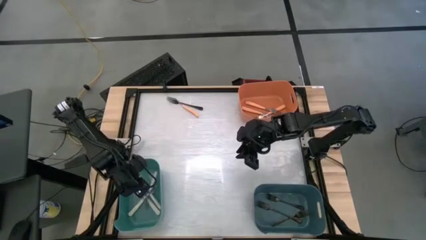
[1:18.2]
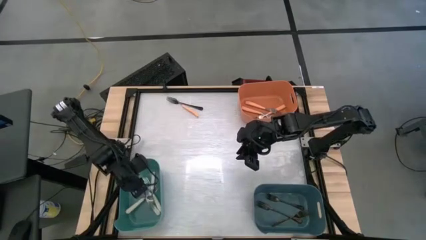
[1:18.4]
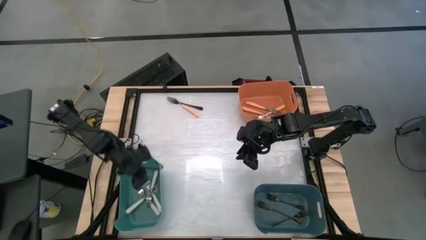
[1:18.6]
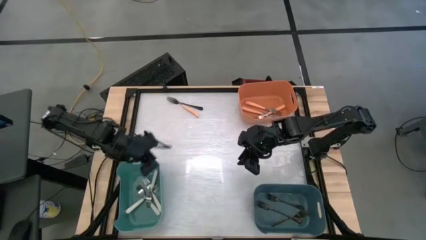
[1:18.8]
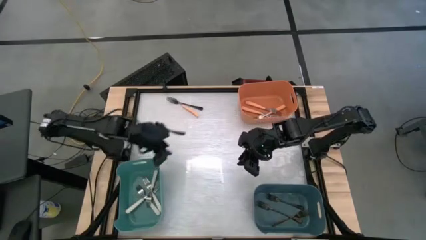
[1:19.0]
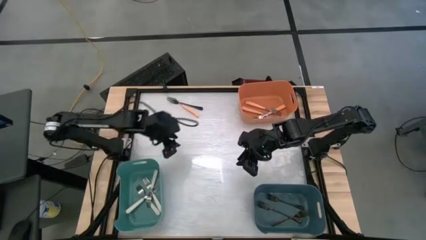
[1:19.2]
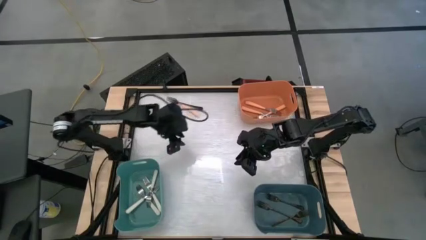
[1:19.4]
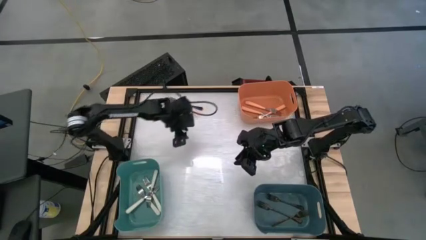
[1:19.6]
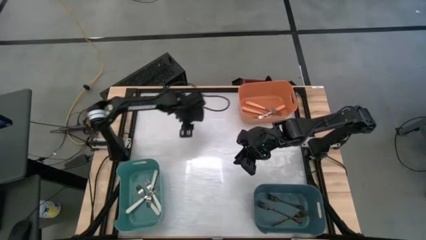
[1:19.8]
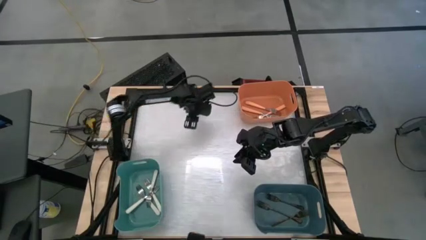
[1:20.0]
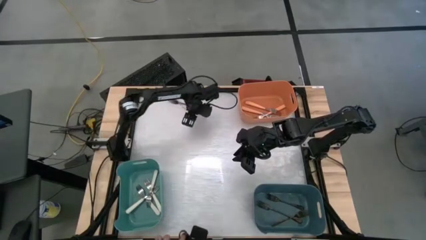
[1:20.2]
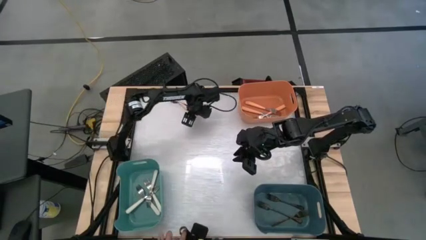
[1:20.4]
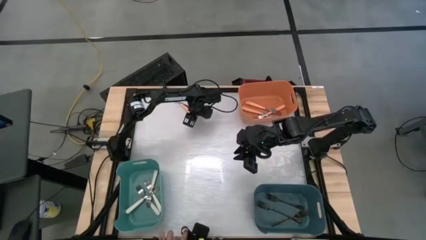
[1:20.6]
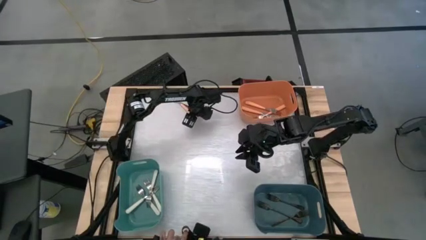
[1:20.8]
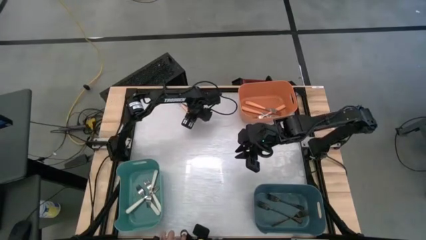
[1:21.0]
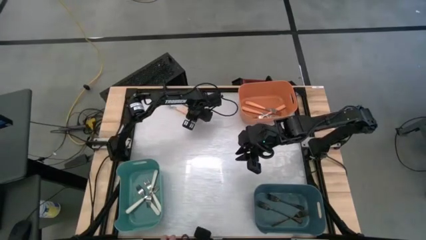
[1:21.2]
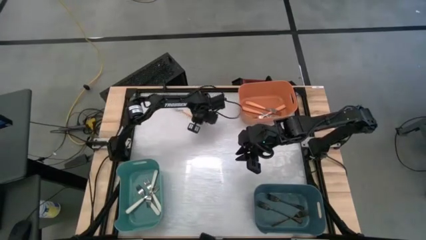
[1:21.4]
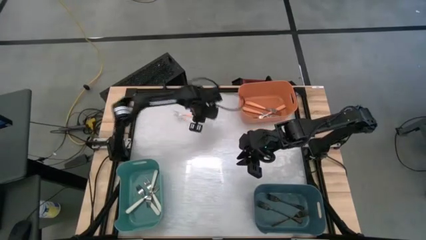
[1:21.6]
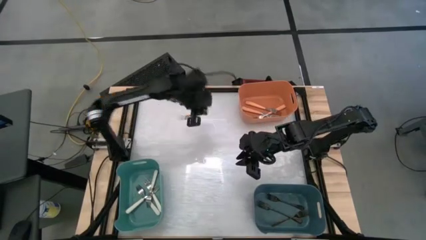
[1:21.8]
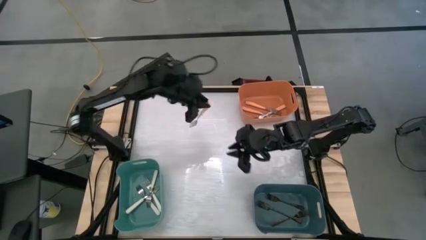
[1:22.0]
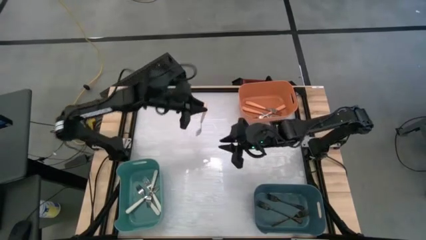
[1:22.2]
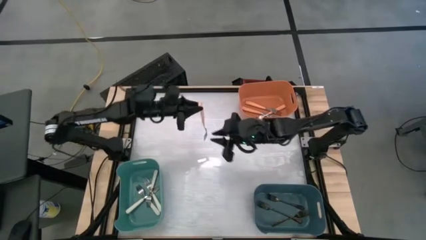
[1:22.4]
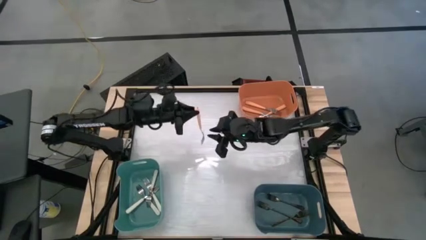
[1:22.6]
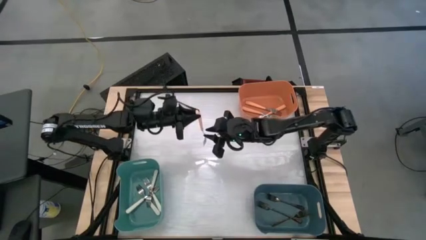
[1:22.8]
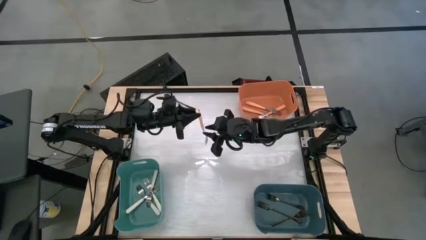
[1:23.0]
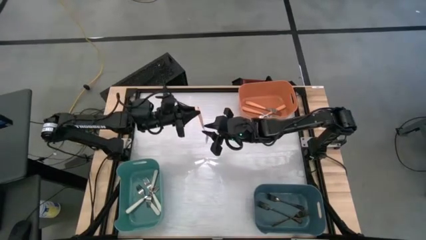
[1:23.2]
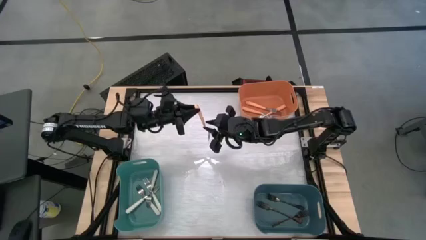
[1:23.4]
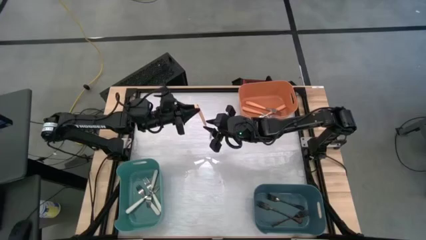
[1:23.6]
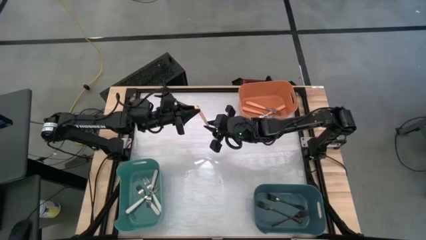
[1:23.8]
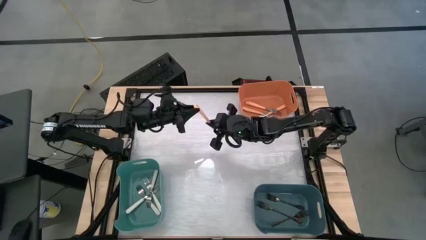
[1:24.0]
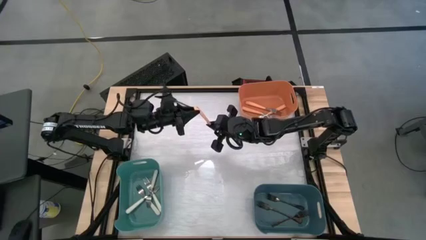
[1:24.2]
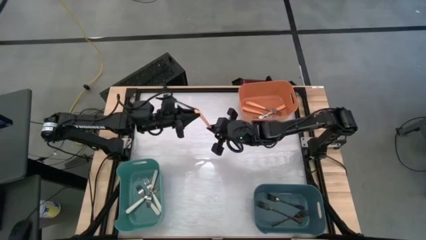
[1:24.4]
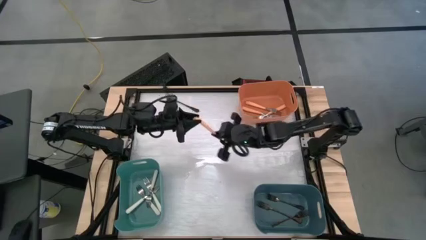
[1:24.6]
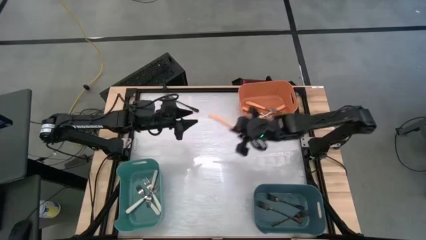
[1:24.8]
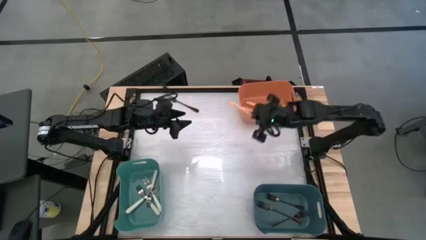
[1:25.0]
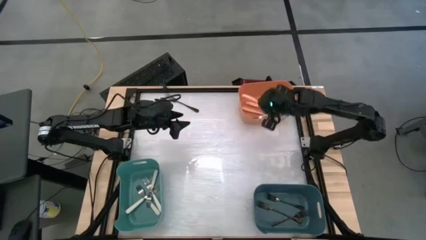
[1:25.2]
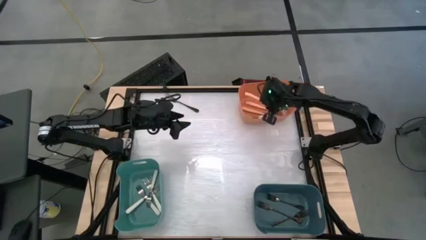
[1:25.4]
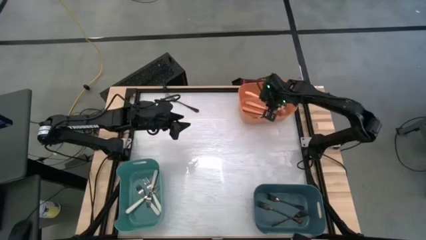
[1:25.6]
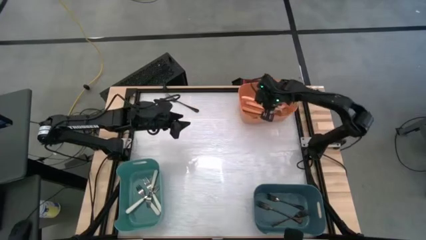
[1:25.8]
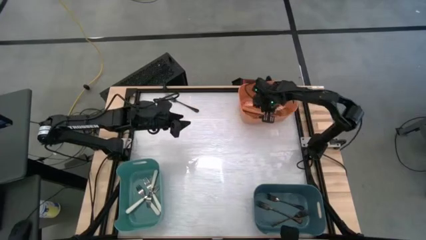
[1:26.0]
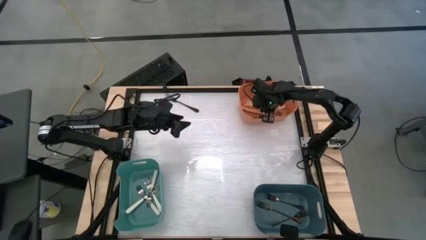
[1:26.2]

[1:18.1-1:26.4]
Task: Sort silverware by color (type)
Put the orange fork into the orange bin

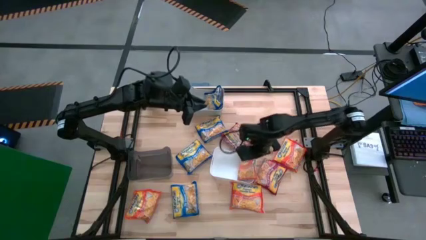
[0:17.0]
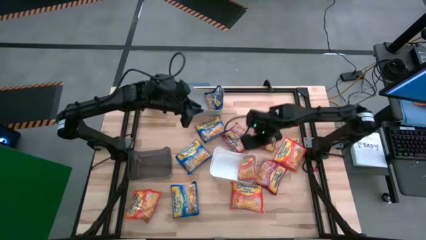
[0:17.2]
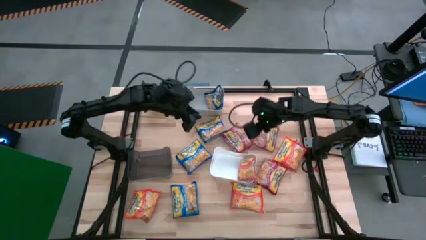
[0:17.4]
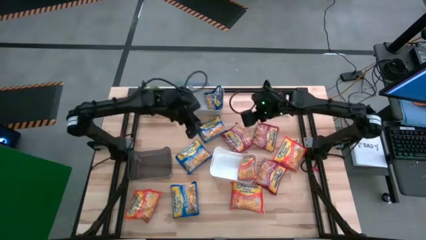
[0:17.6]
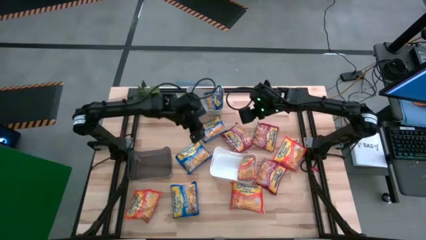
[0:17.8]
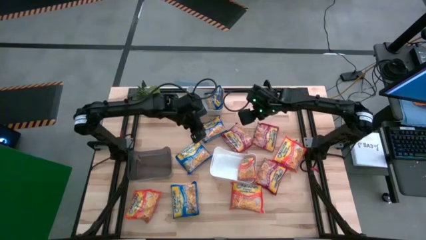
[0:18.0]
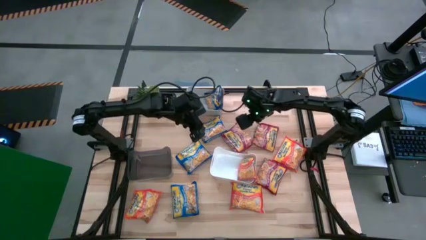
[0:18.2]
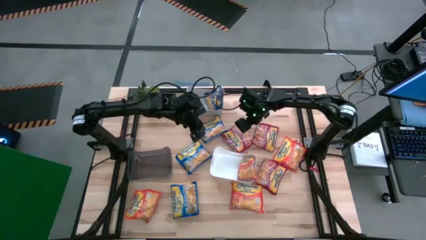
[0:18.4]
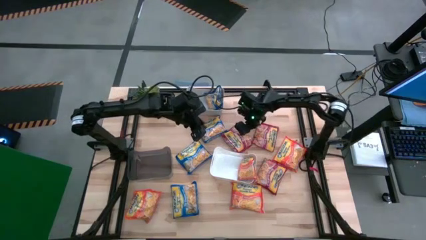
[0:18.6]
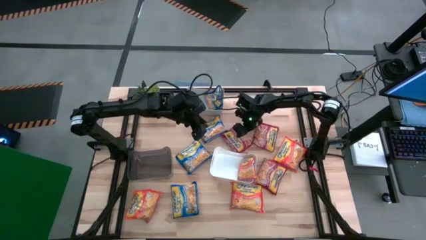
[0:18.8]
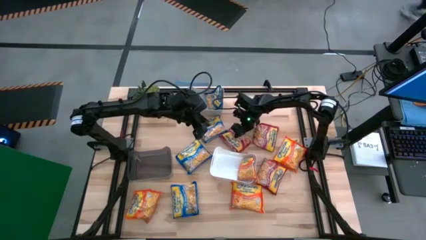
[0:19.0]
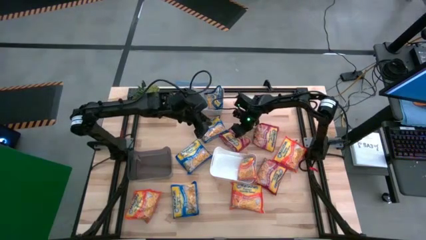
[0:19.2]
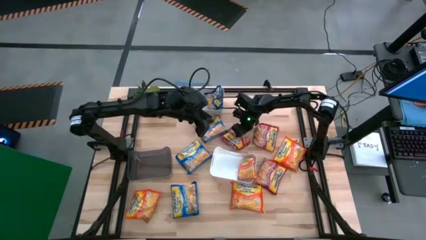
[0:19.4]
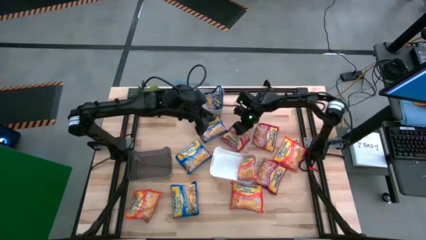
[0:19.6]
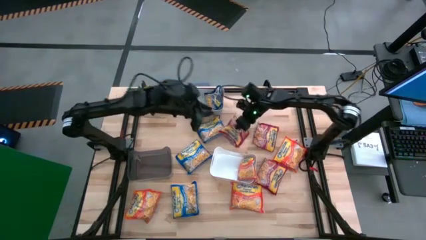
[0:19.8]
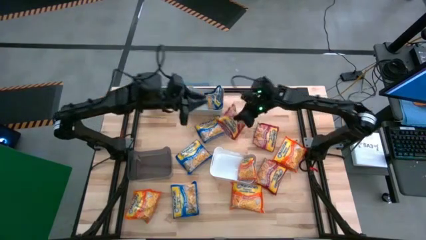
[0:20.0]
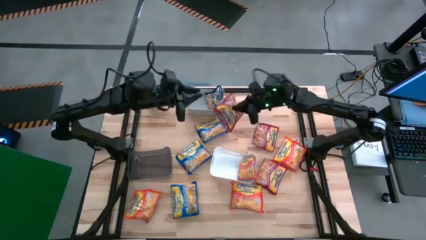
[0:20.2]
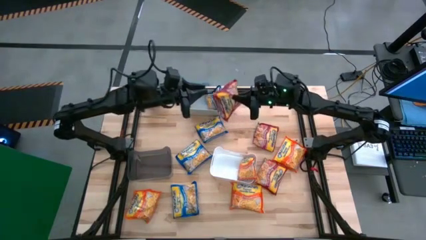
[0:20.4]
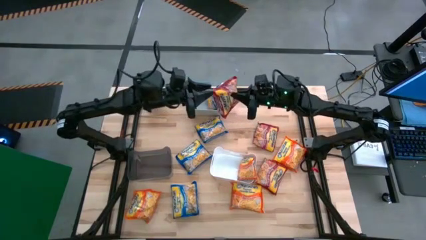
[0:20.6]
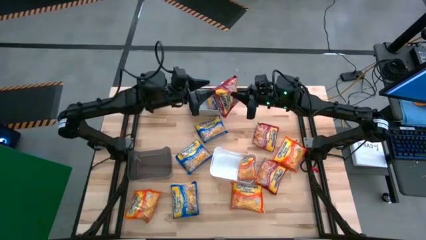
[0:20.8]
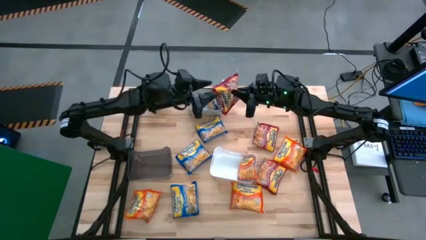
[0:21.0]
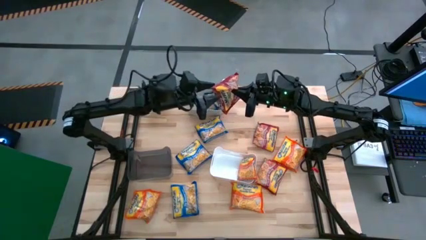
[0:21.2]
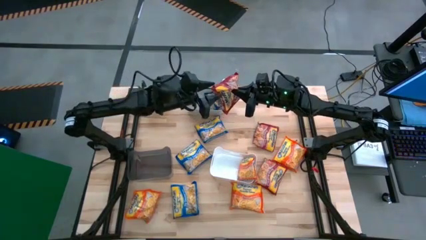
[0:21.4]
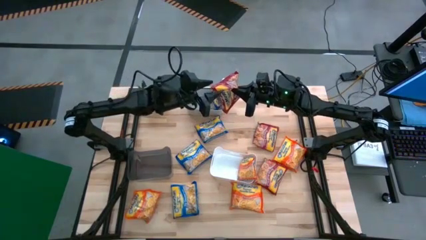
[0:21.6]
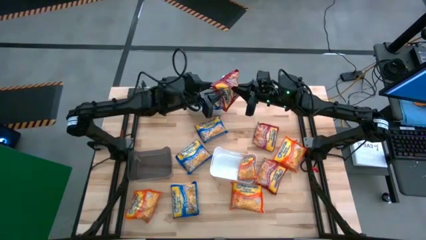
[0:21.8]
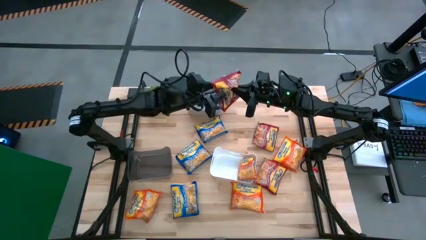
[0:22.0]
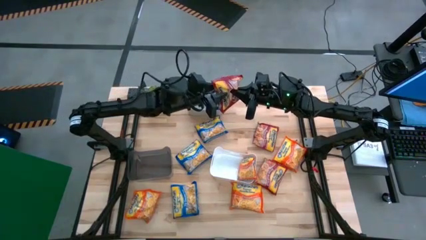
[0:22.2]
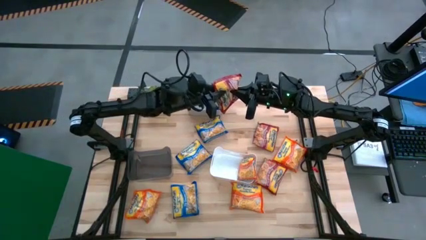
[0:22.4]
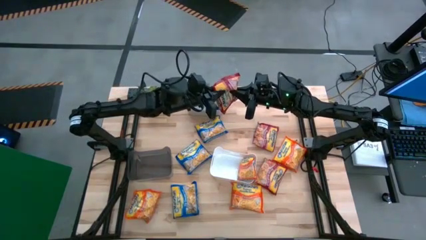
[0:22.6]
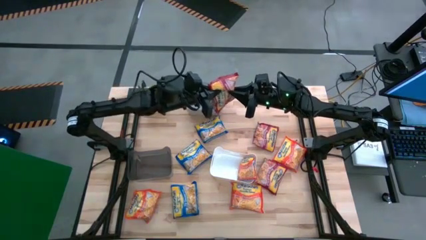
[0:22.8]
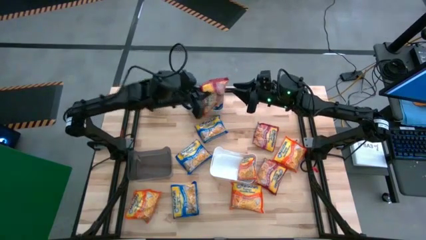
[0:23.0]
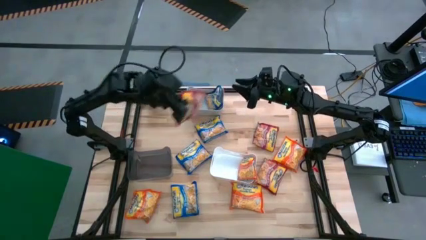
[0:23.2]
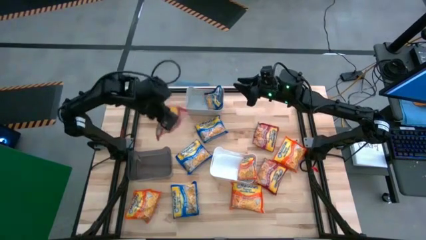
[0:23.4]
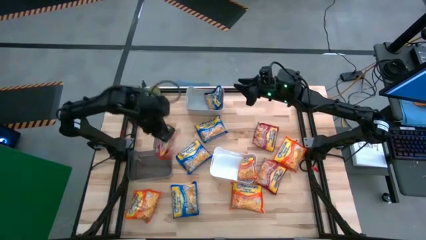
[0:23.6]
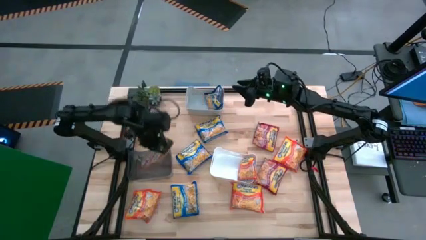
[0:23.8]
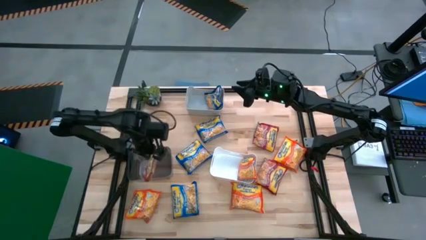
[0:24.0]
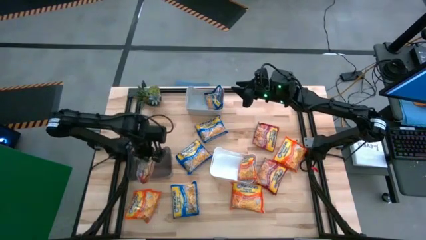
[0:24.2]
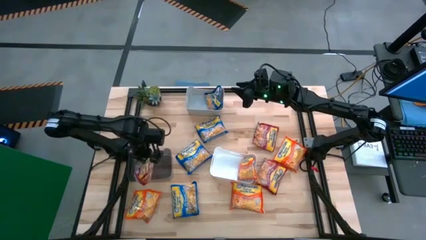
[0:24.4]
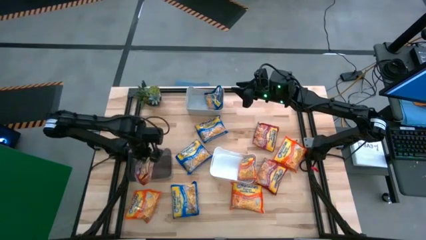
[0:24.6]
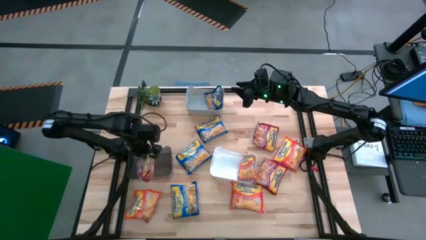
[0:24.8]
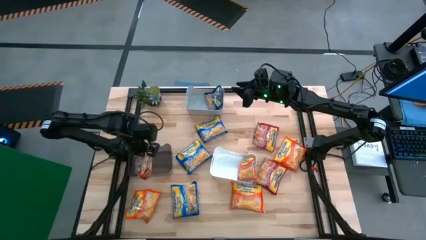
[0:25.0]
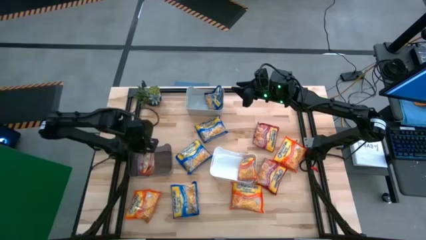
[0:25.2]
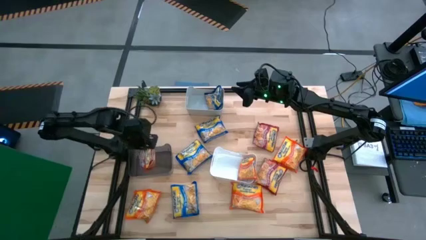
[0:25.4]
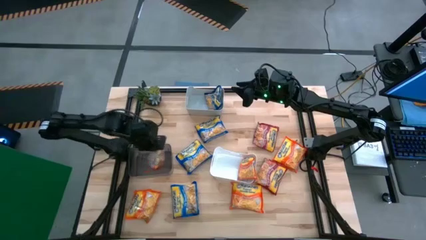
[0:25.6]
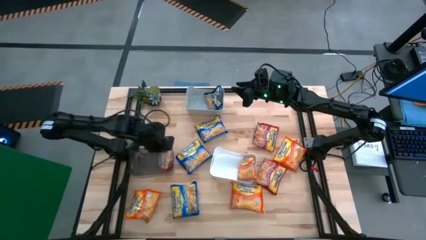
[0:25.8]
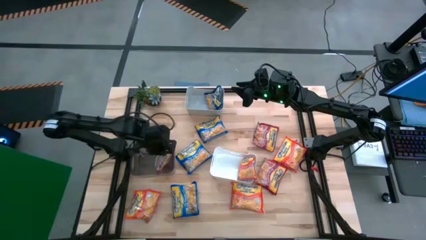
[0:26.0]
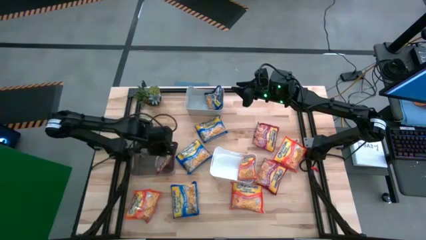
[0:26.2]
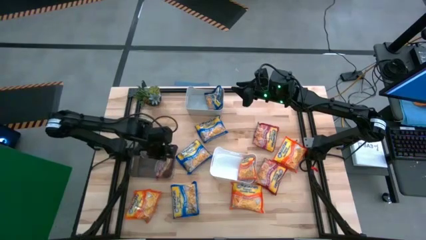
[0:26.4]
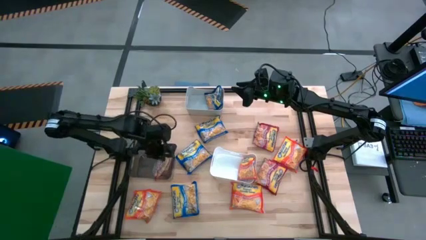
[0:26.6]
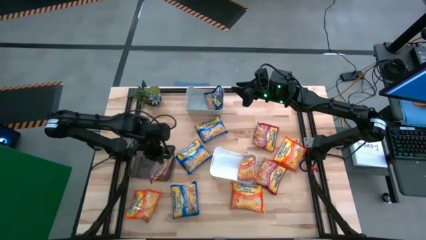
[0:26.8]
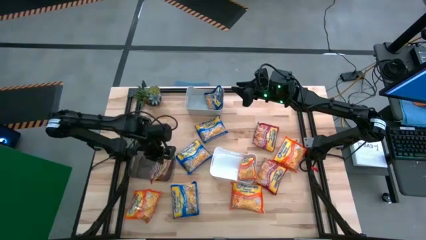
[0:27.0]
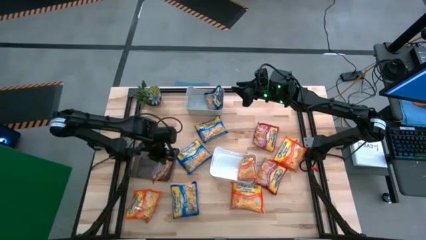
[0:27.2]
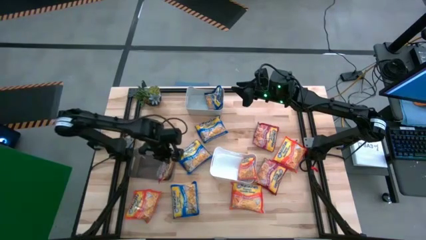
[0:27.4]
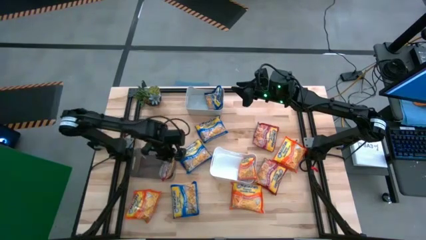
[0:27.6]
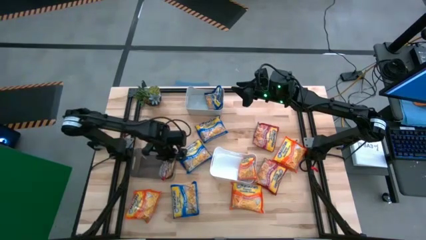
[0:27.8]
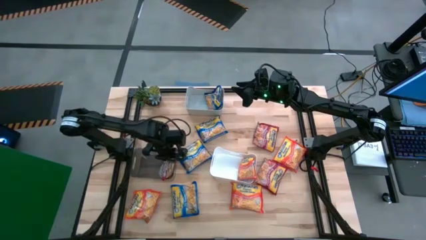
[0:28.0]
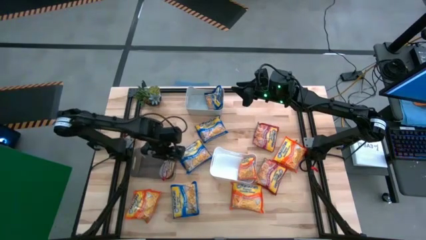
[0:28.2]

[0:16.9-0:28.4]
Task: Sort Maruchan noodles
Put the red noodle pack into the black bin
